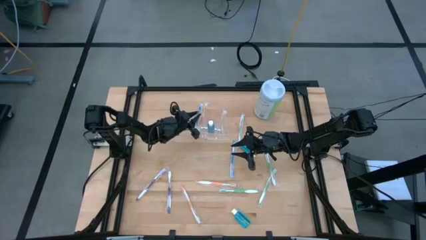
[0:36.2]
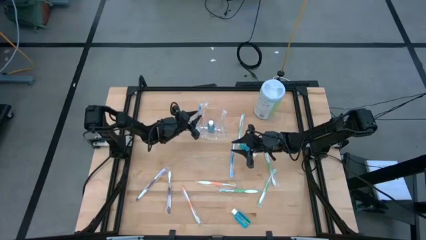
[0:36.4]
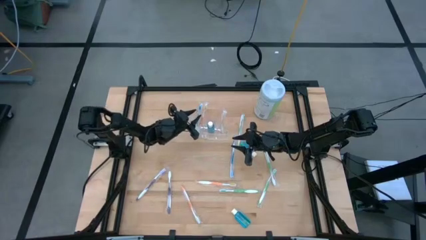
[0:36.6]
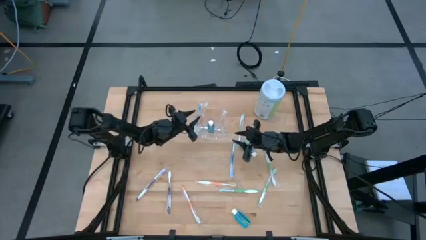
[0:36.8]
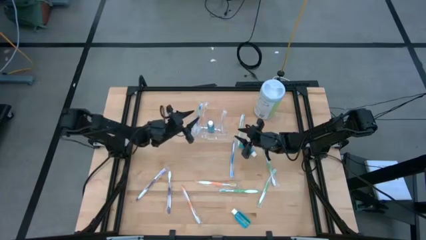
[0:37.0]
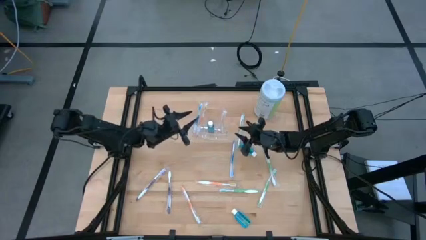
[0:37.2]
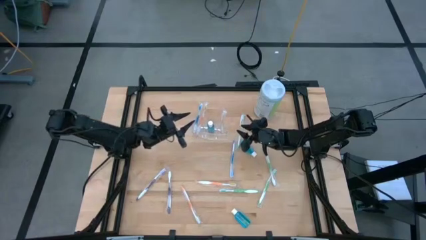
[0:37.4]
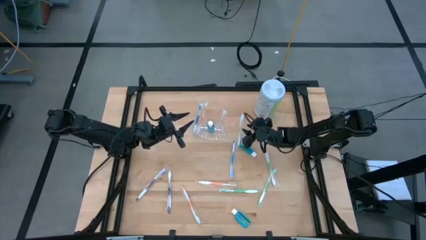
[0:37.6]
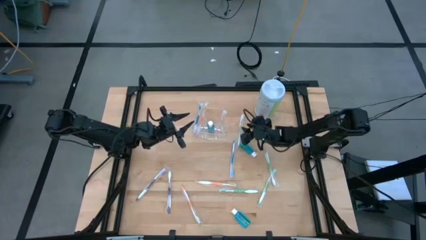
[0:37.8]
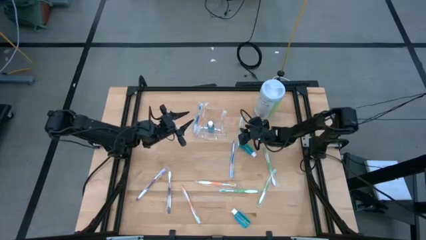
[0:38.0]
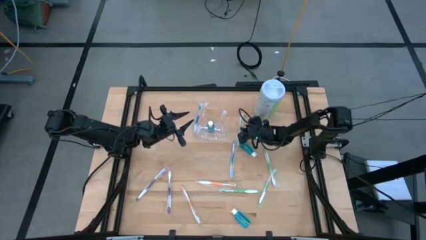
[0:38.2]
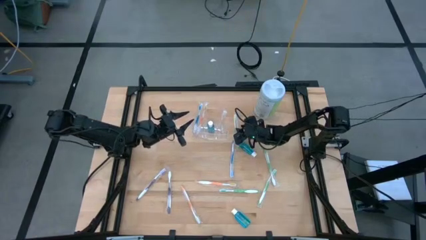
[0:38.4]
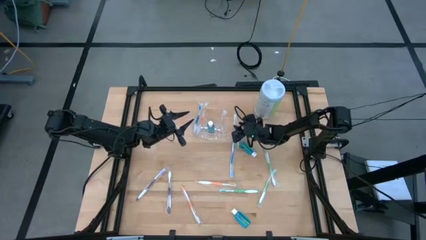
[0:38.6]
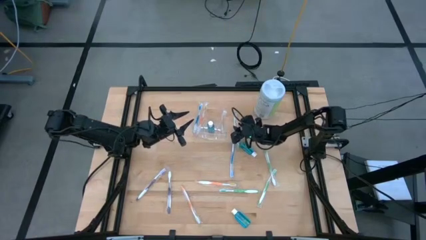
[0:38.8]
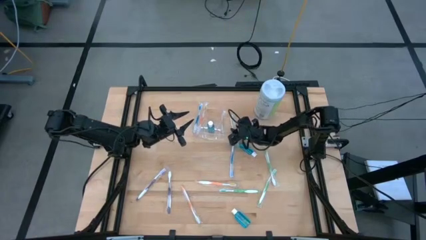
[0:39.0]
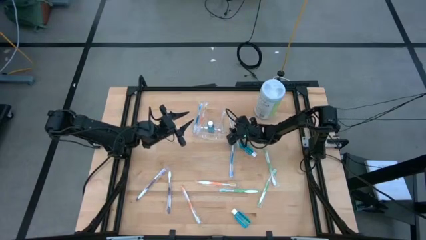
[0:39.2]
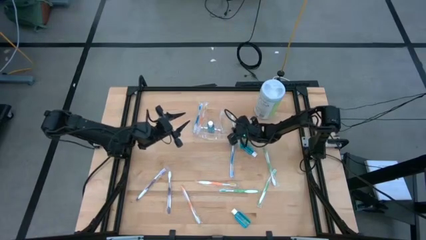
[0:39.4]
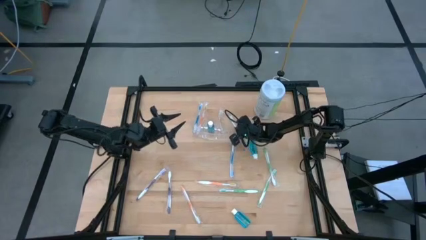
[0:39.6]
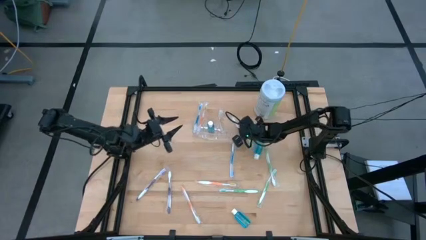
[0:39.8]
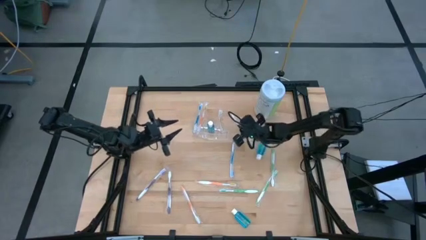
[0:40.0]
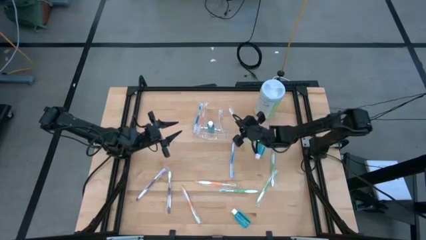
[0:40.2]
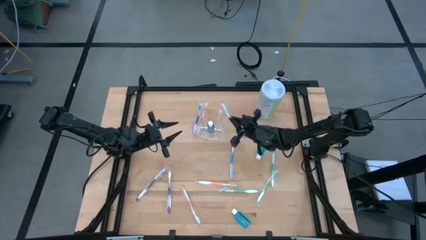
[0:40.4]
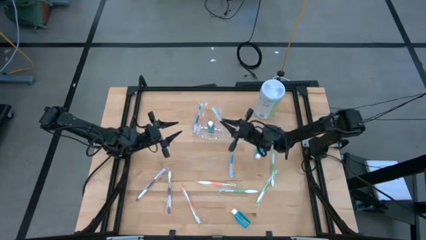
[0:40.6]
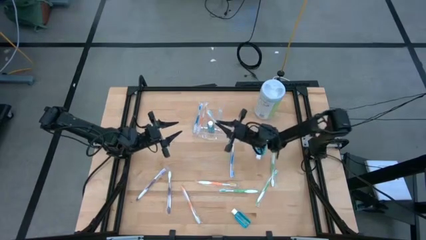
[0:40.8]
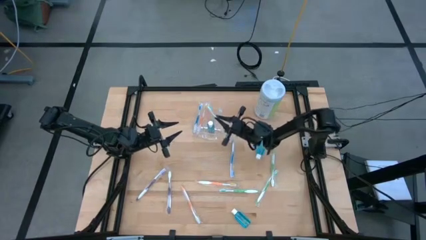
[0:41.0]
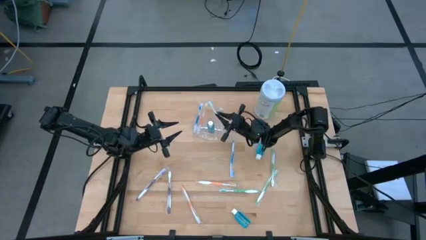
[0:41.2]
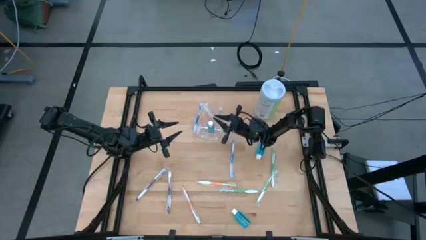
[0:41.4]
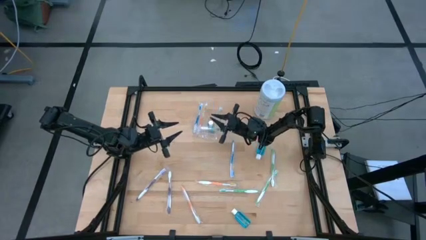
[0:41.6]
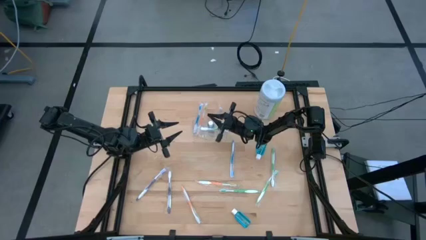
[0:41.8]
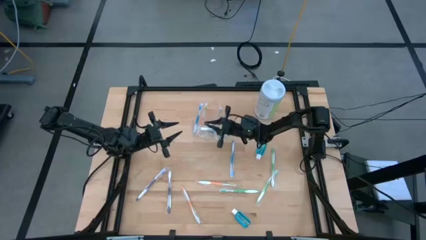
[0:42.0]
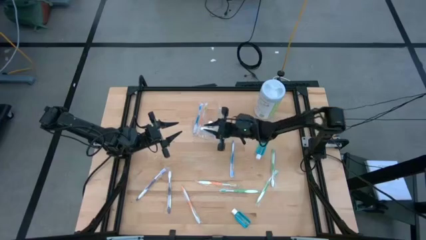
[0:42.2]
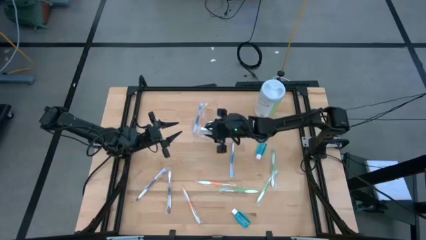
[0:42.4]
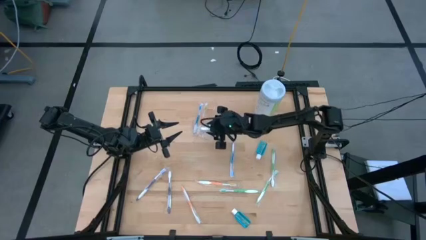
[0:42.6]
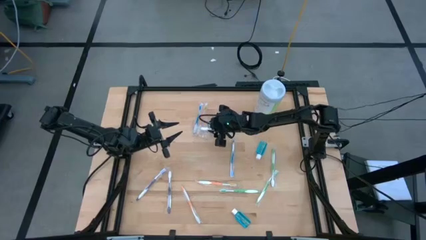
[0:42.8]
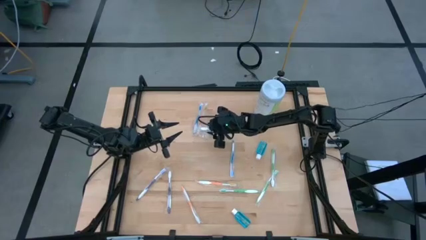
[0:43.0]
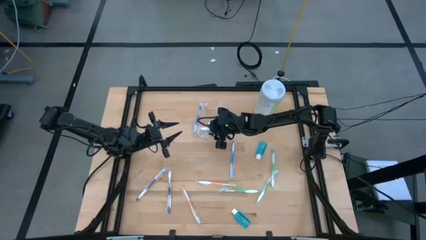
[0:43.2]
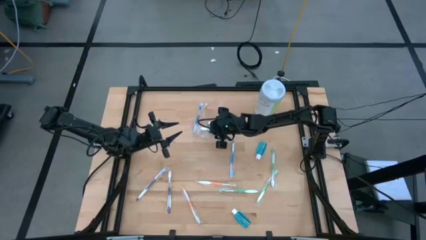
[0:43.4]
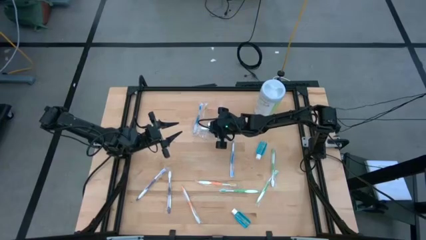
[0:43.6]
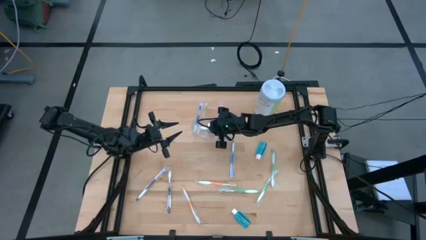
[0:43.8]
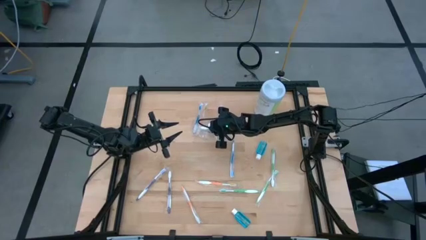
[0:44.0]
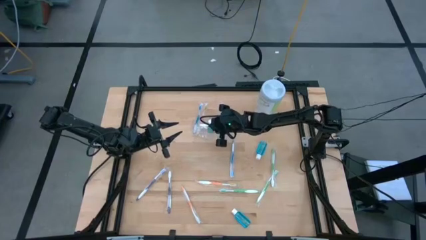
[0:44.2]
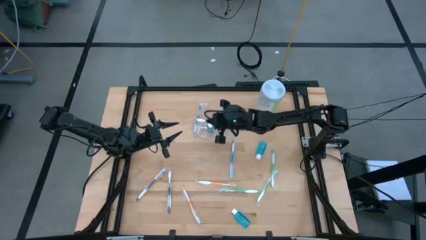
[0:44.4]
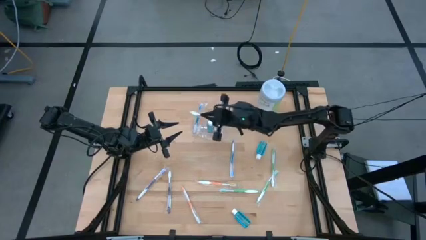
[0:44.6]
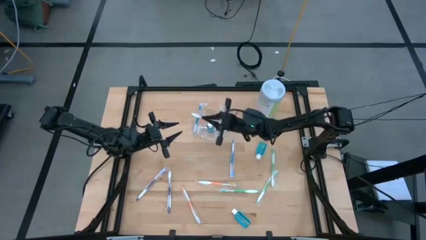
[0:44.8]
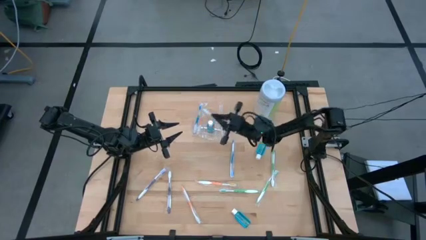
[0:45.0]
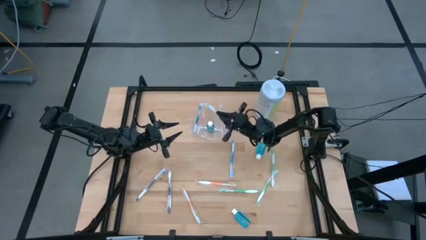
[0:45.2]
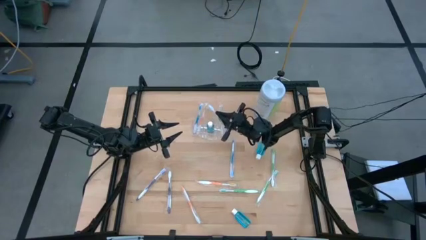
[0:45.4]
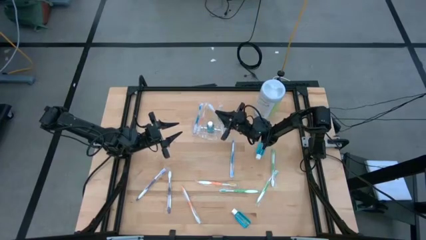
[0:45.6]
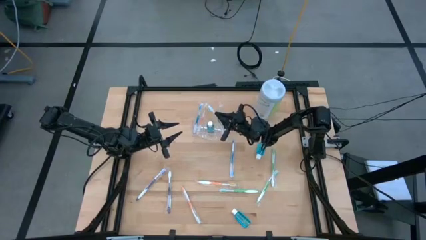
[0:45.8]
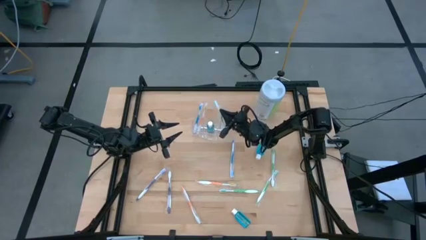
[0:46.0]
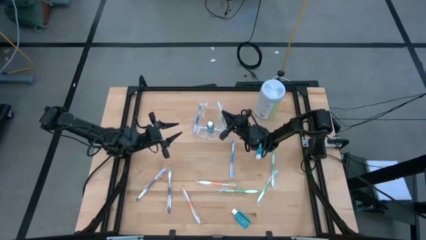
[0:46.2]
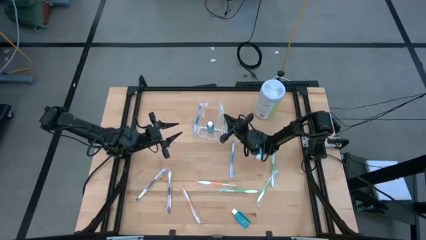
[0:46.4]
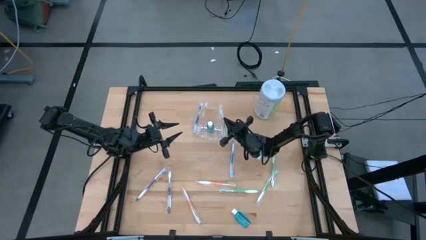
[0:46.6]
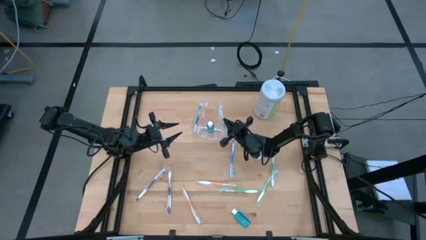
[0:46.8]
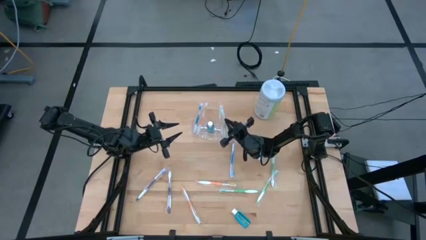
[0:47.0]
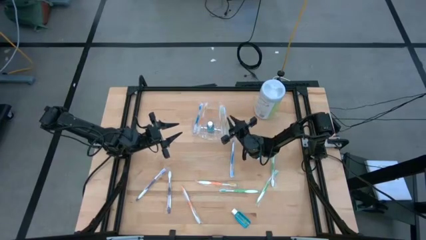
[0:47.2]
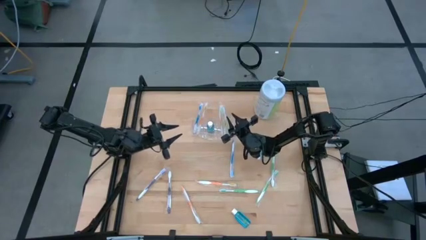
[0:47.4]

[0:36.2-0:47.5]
Task: Pick & Place toothbrushing station
Put the top green toothbrush into the transparent organizer

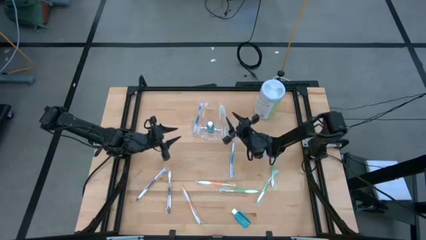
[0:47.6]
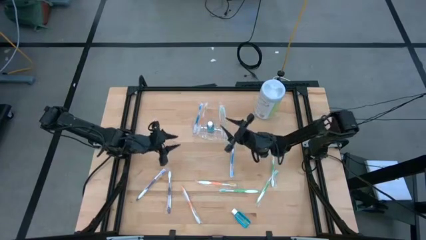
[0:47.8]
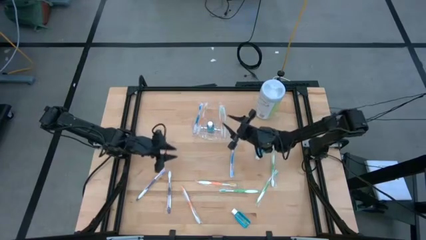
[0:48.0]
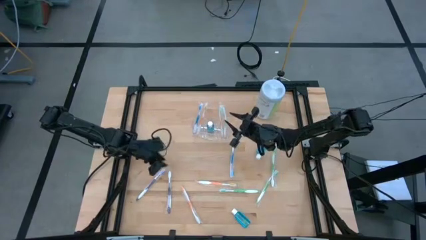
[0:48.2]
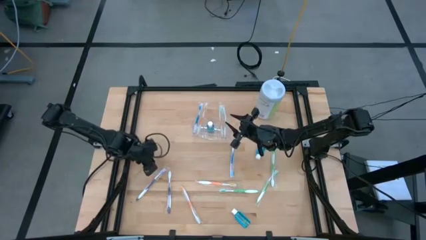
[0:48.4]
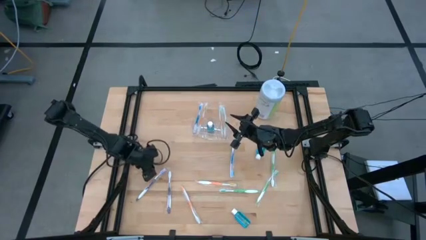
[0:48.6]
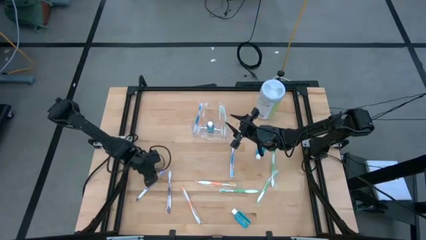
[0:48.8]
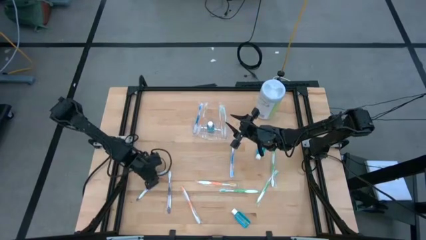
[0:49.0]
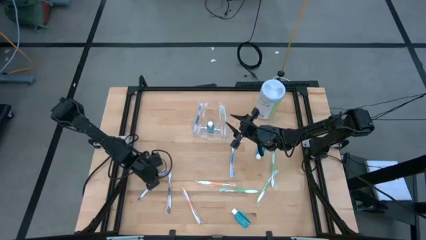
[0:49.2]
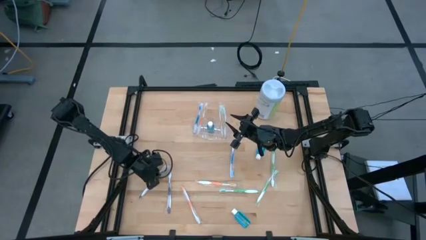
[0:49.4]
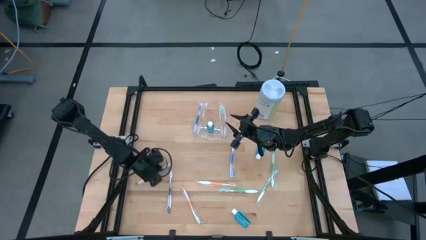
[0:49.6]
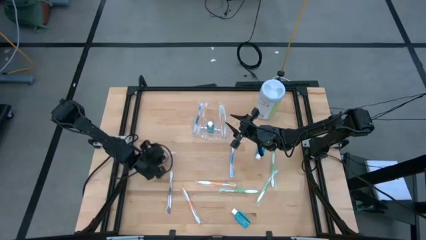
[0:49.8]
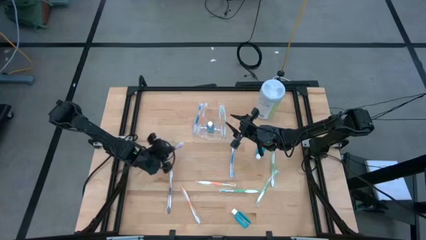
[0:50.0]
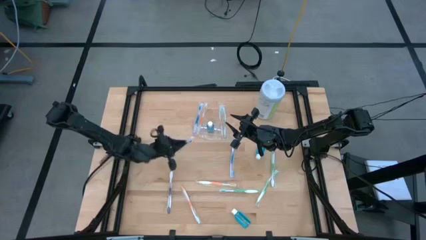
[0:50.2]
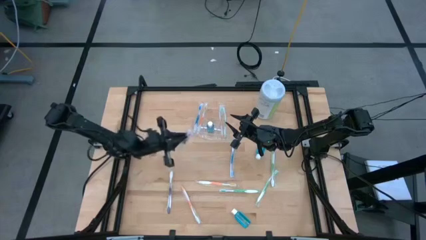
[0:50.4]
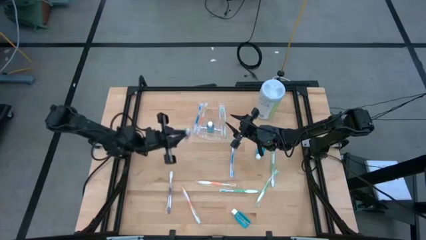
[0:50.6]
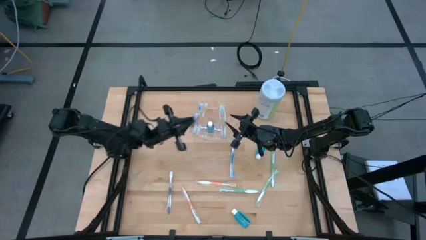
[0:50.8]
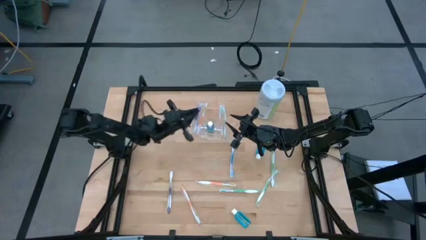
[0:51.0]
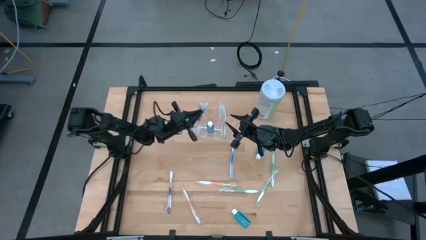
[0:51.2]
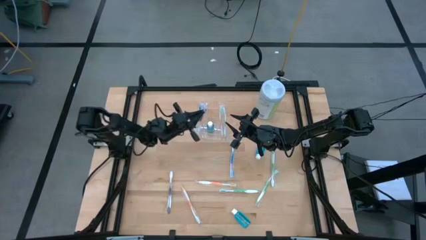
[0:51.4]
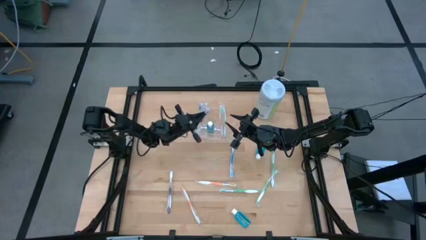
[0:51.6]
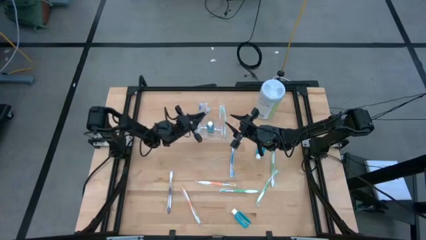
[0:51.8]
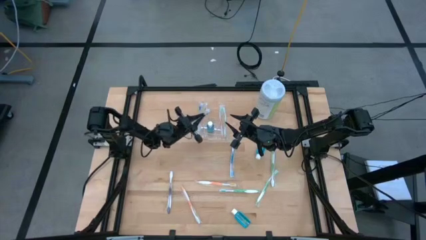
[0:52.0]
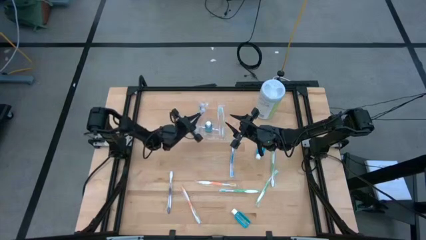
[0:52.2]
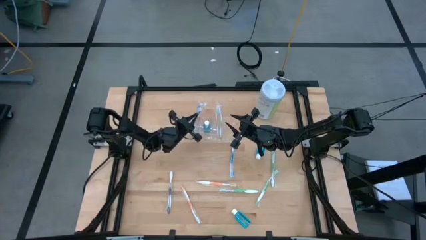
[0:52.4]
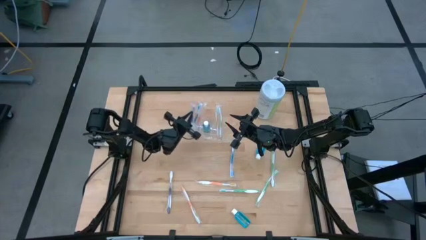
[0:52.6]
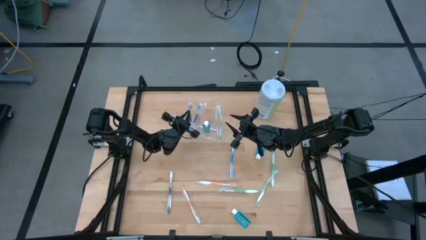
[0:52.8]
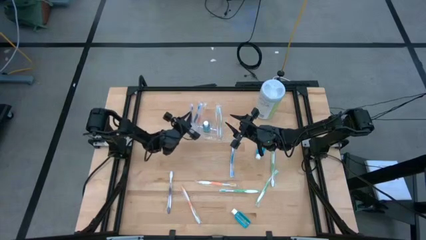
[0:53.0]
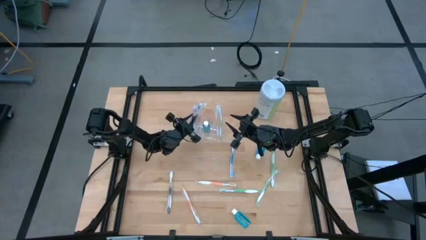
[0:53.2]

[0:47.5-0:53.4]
Put the left violet toothbrush into the transparent organizer
